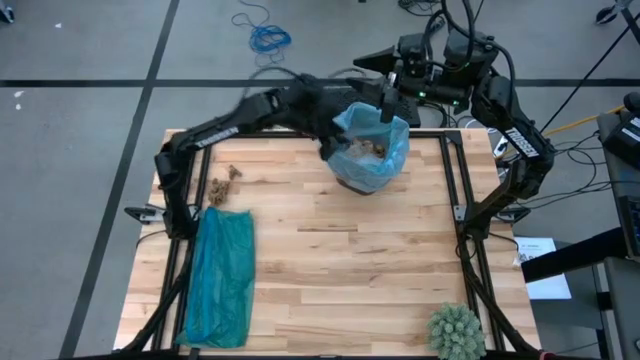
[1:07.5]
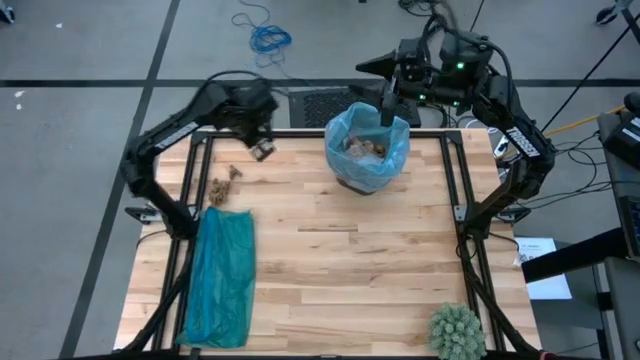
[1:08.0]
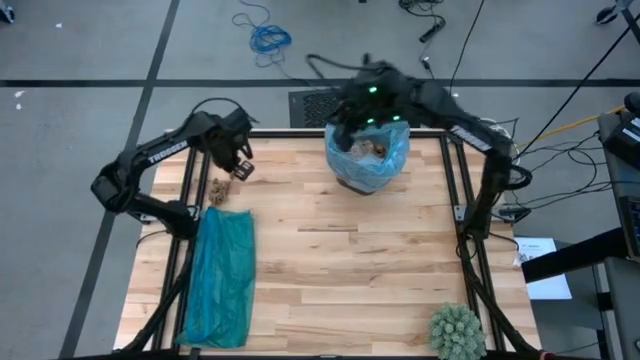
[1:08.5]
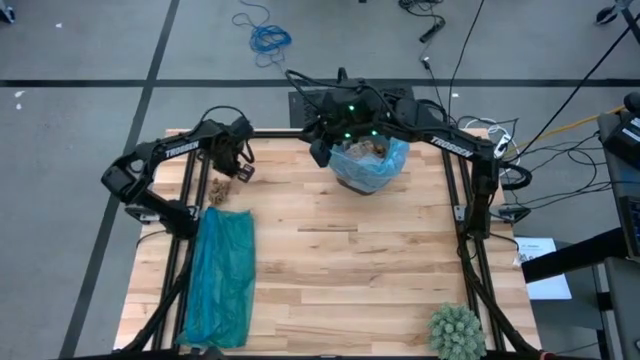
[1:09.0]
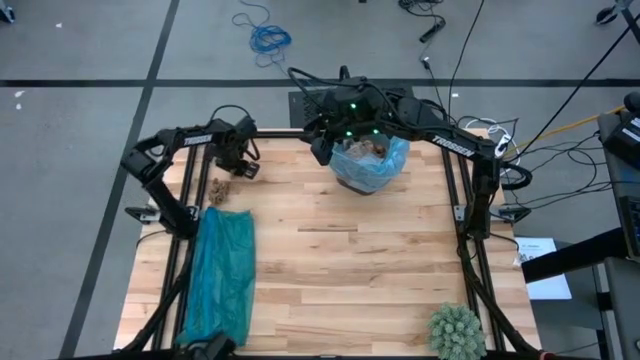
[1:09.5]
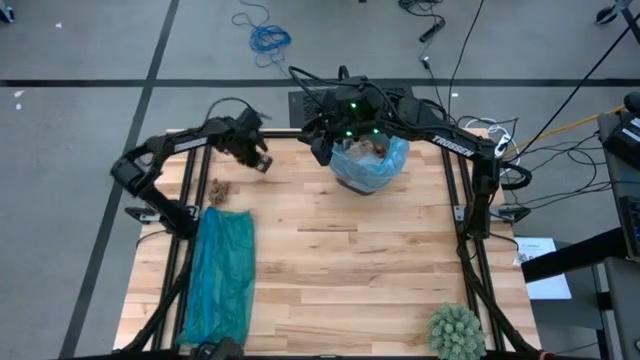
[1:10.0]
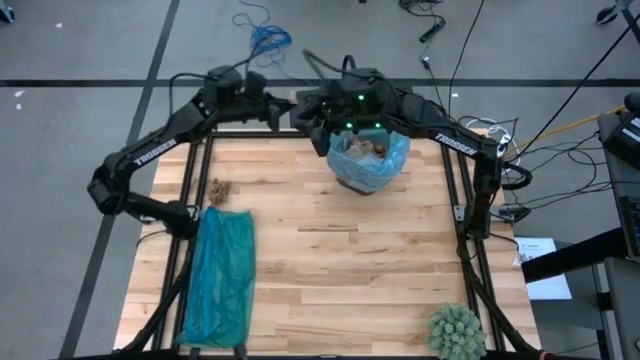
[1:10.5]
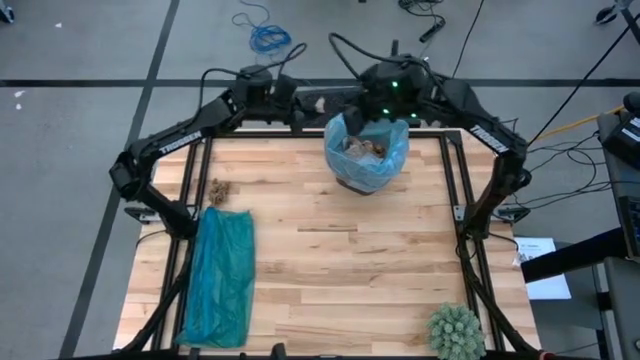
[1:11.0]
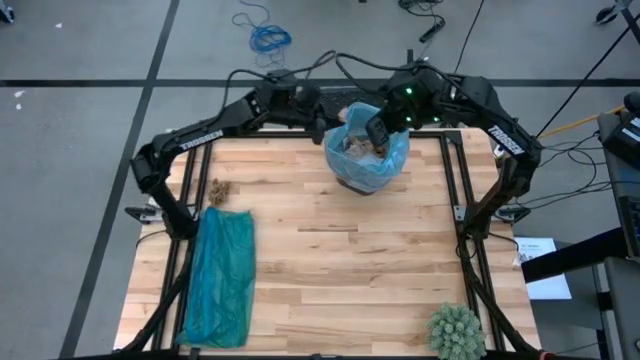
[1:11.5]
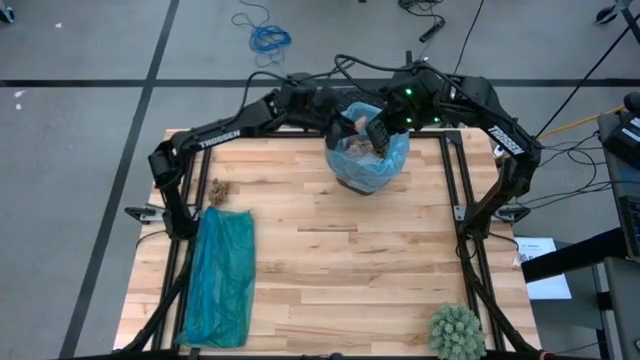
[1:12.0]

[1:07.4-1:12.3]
Task: place trash/remove bag and relplace
Put the brown napkin into the trash bin

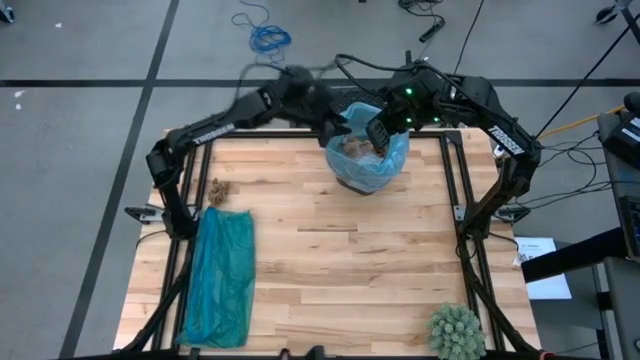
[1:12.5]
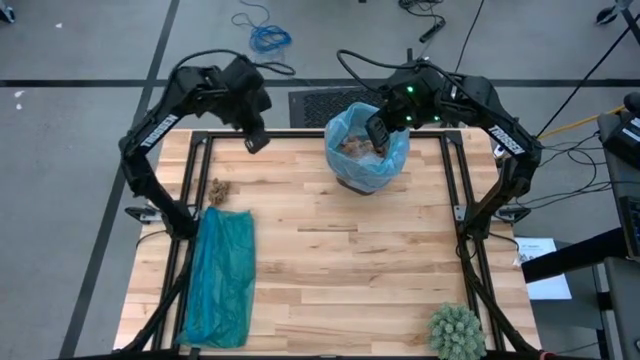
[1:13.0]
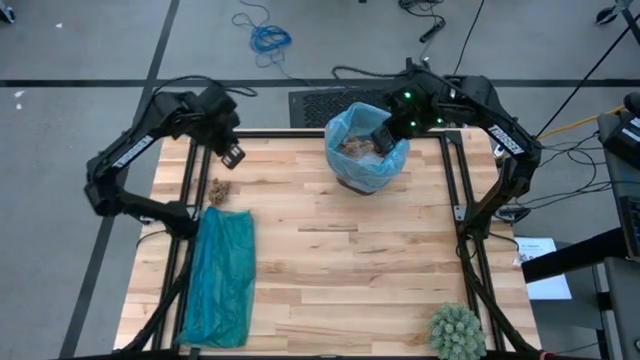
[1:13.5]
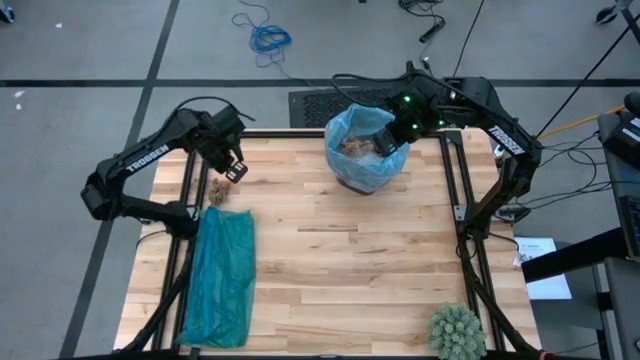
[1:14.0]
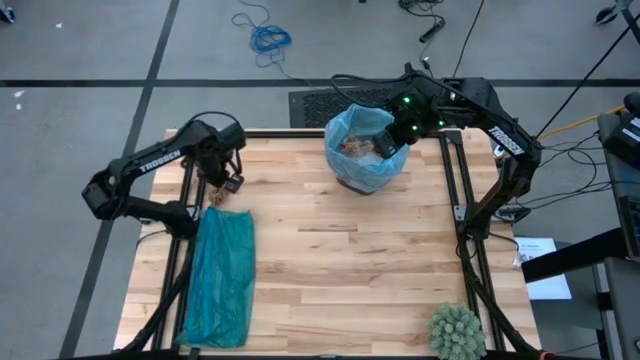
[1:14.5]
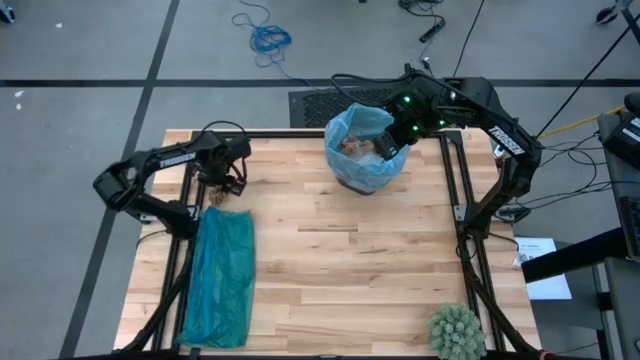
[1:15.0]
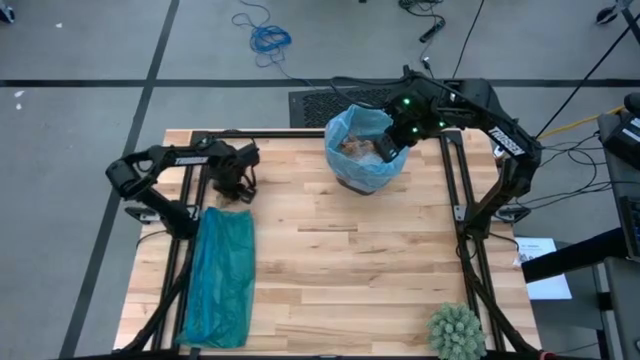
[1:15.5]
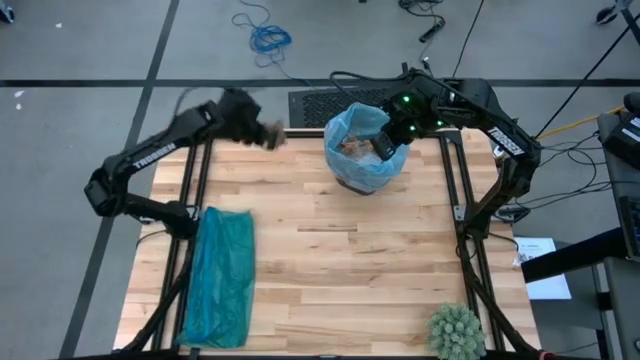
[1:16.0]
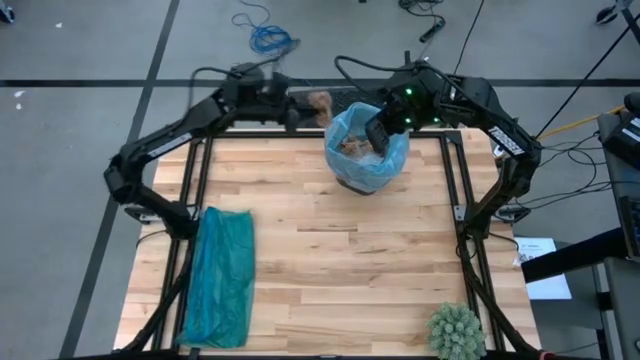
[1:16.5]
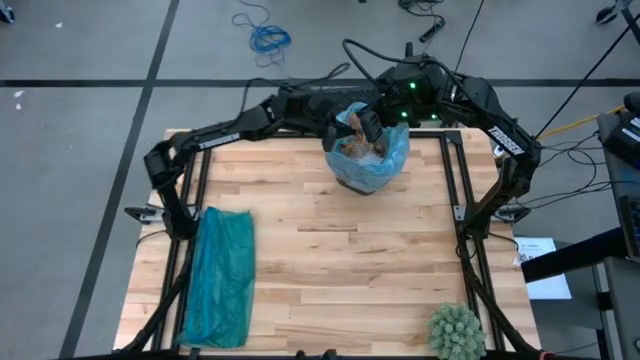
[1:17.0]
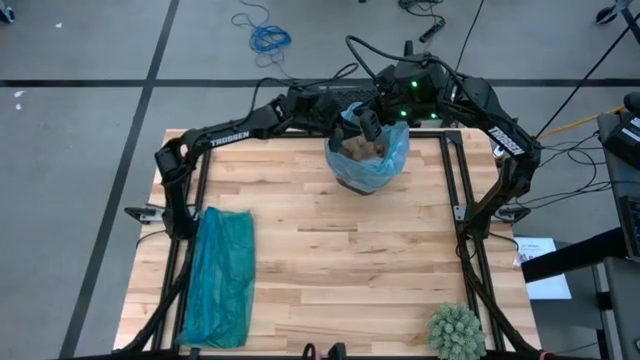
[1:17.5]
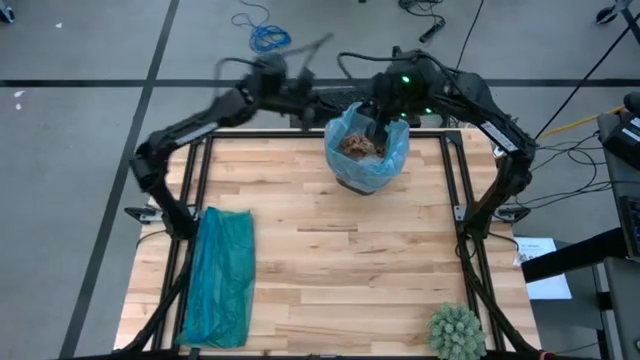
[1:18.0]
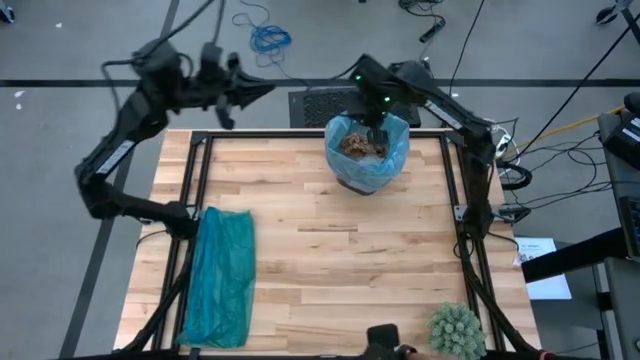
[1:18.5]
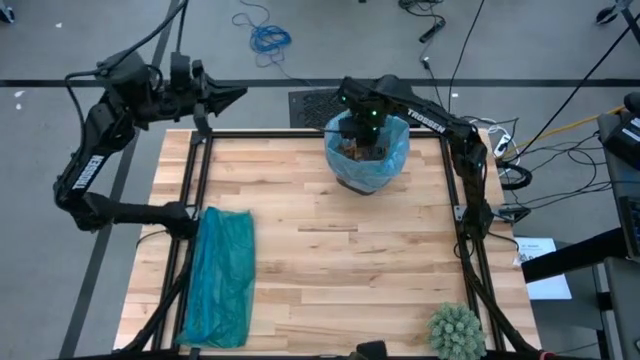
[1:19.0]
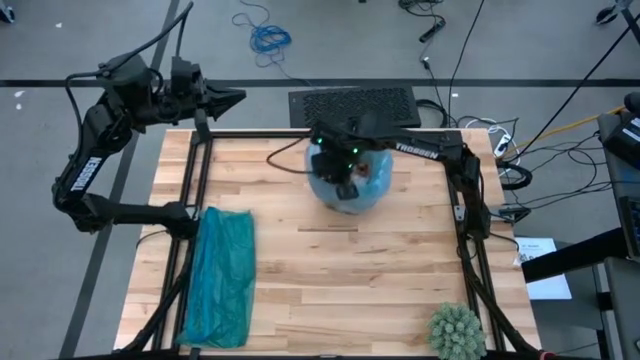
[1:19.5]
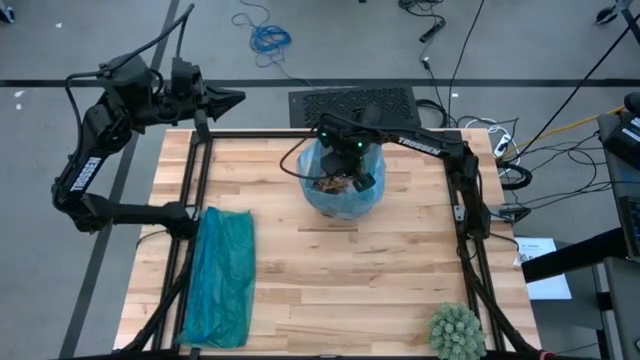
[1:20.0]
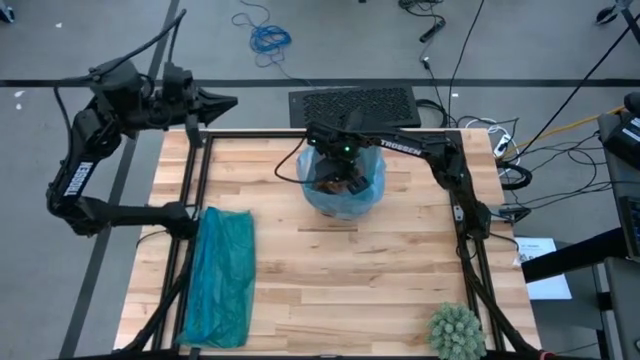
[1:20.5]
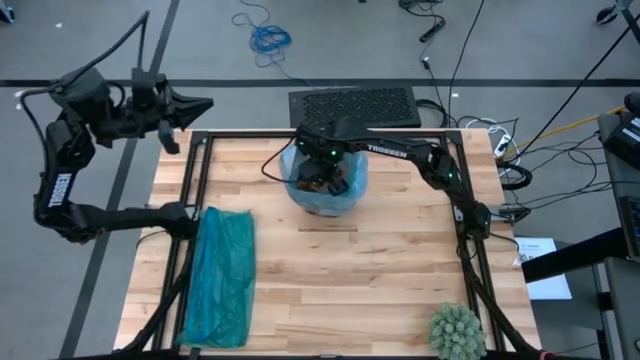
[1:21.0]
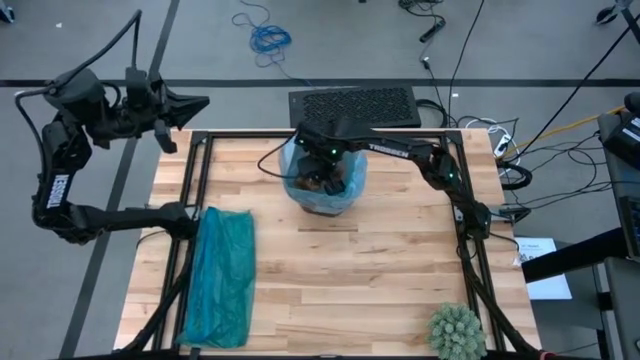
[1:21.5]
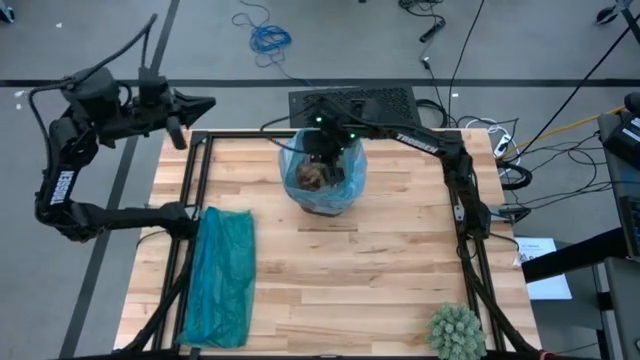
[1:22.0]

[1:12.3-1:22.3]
Put the brown napkin into the trash bin

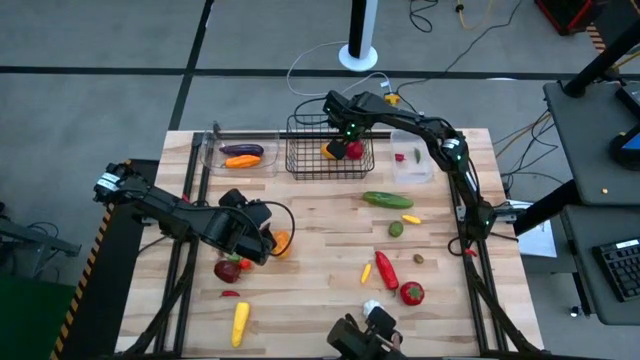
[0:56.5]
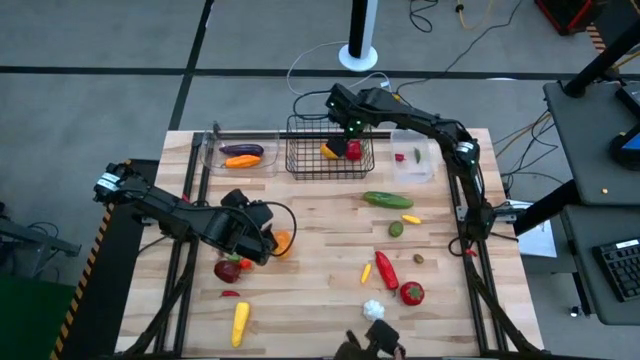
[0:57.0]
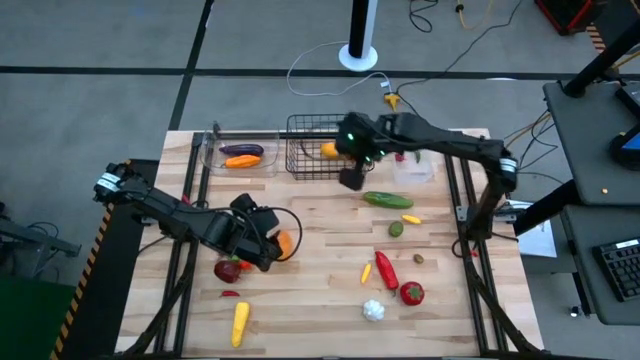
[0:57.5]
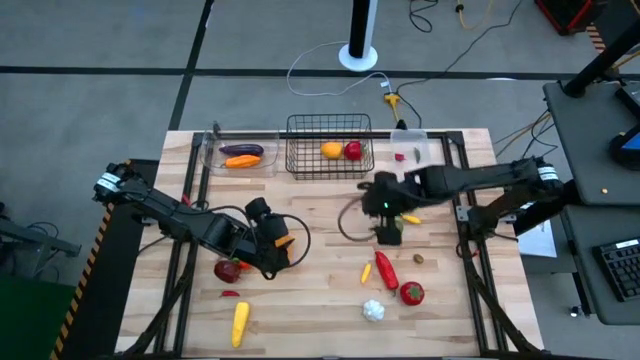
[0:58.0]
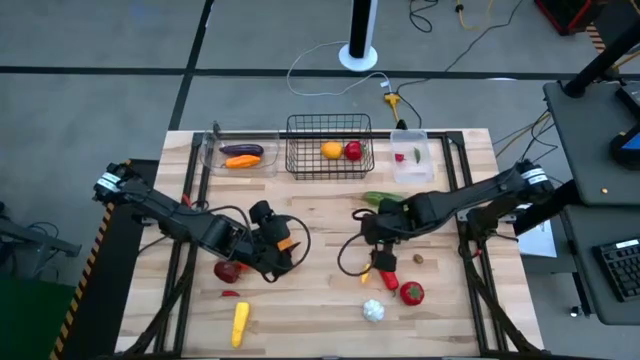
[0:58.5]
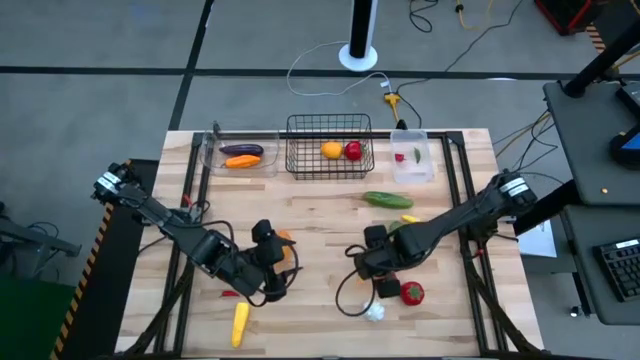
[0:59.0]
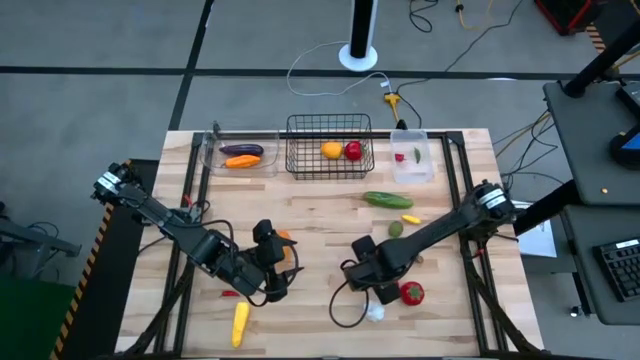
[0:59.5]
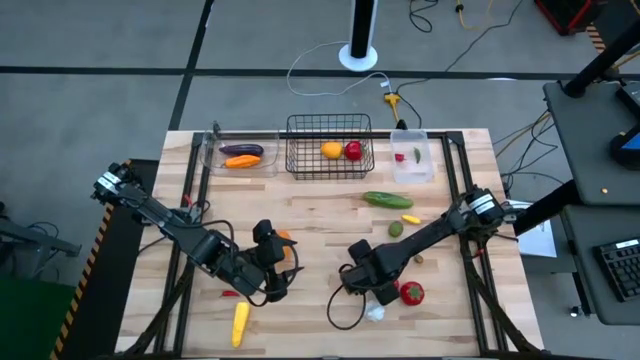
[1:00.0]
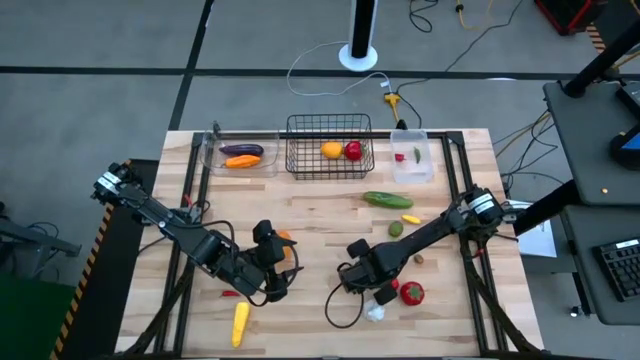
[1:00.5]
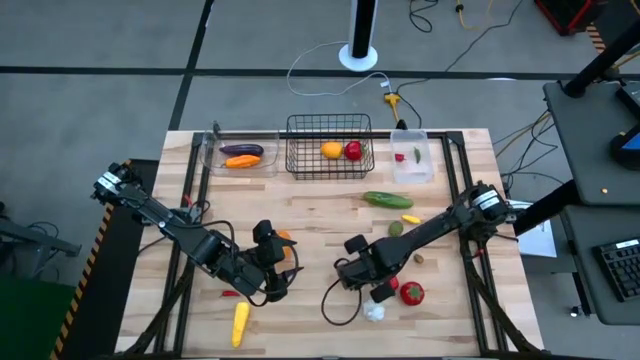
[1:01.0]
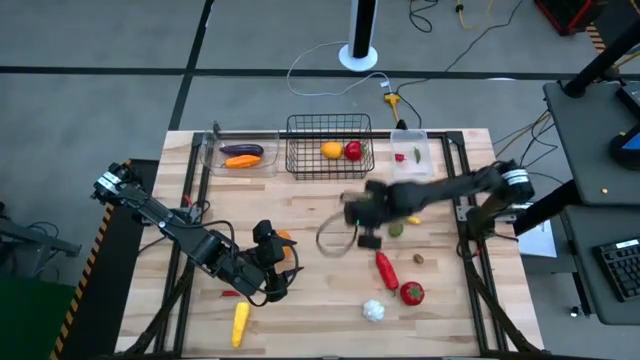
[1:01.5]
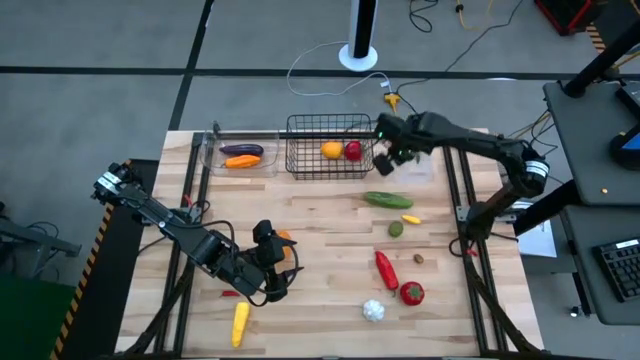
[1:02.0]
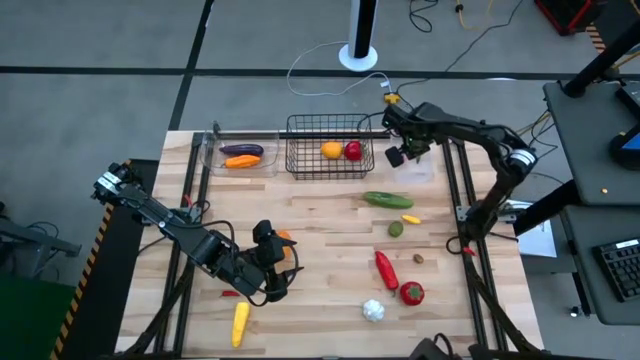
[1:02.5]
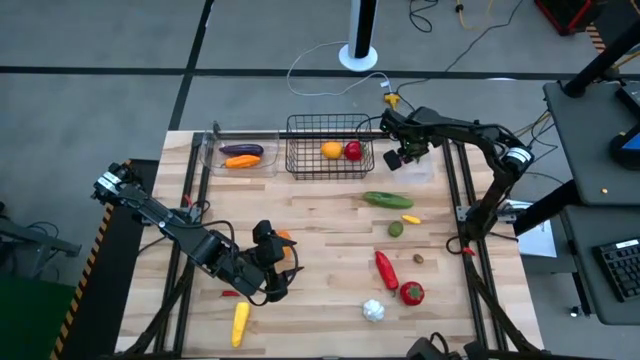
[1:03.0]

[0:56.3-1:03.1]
Task: Sort produce into baskets
Put the right baby corn into the white bin
